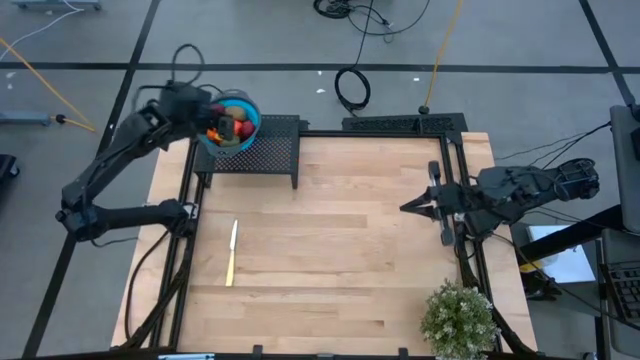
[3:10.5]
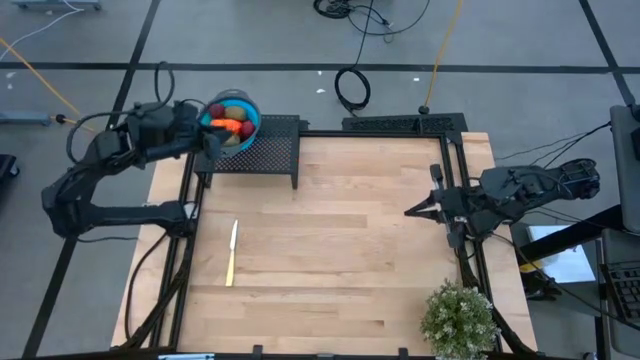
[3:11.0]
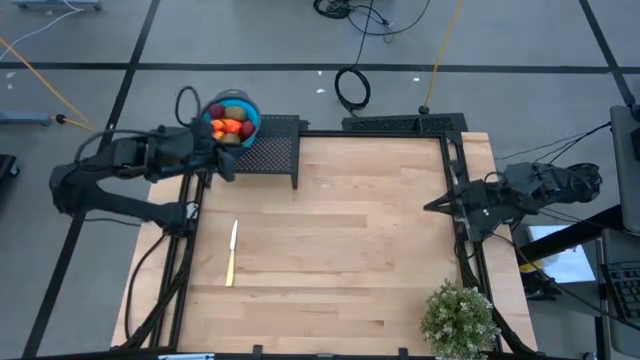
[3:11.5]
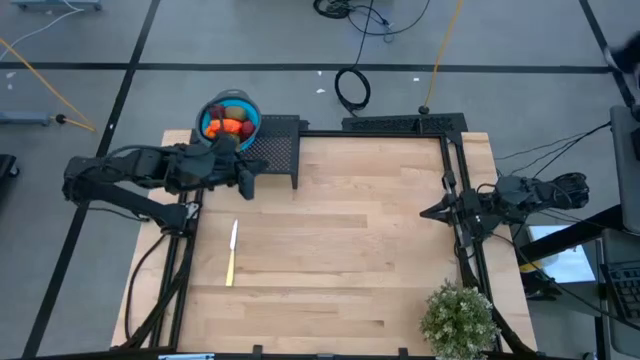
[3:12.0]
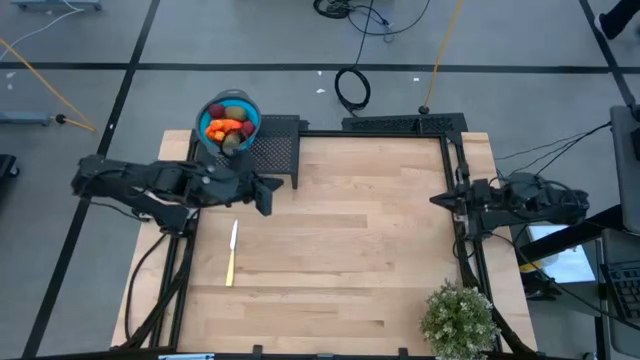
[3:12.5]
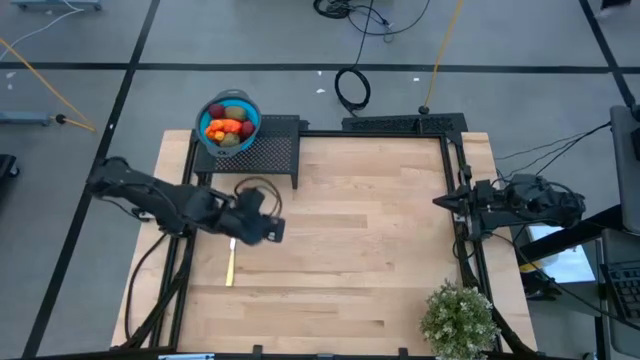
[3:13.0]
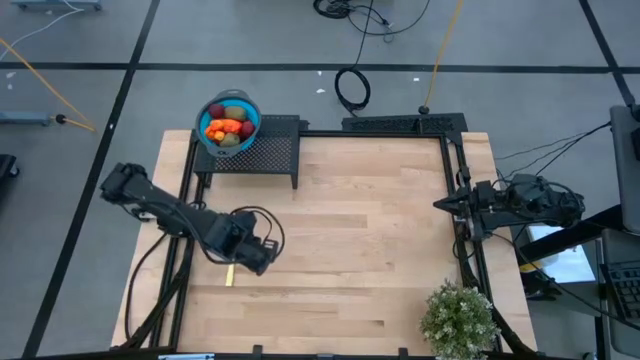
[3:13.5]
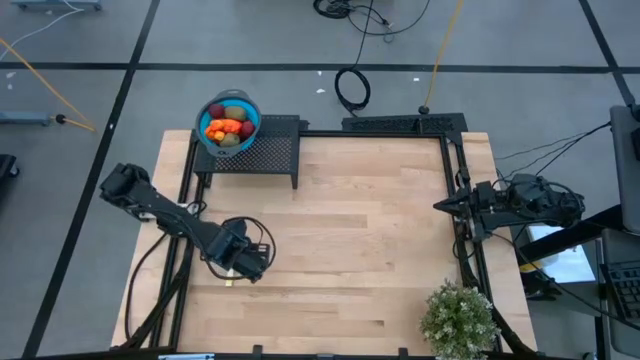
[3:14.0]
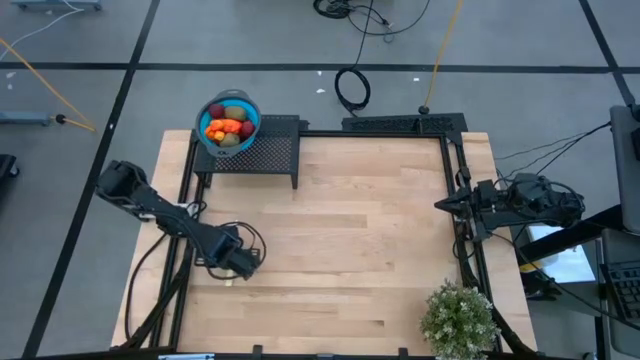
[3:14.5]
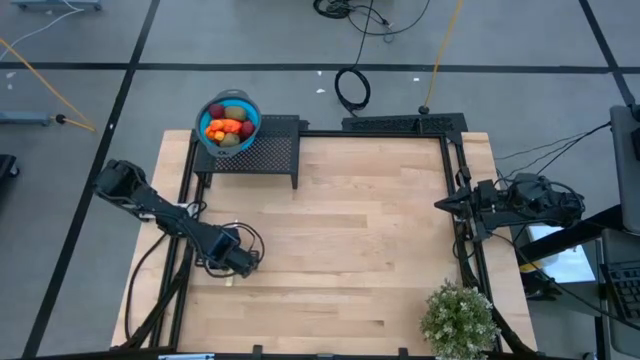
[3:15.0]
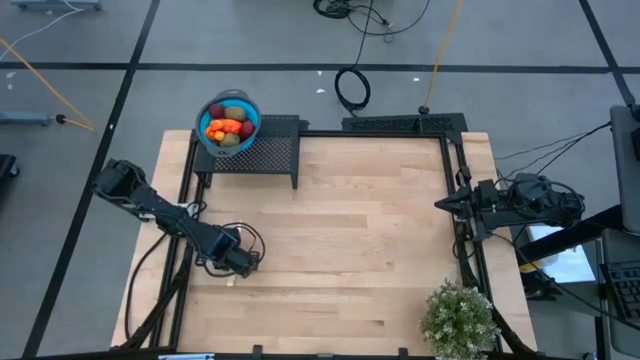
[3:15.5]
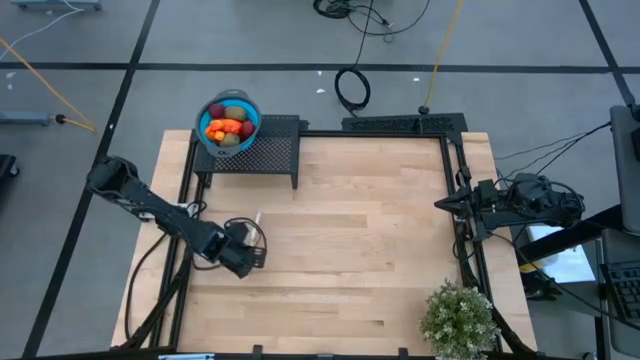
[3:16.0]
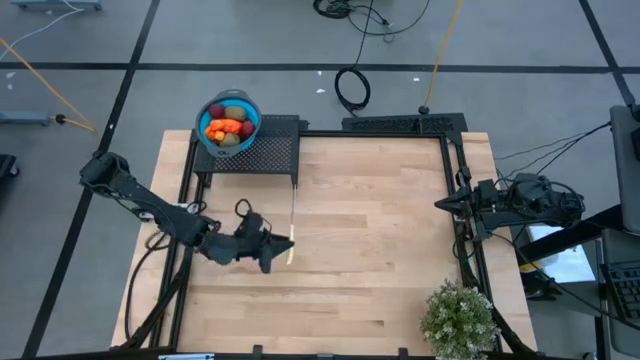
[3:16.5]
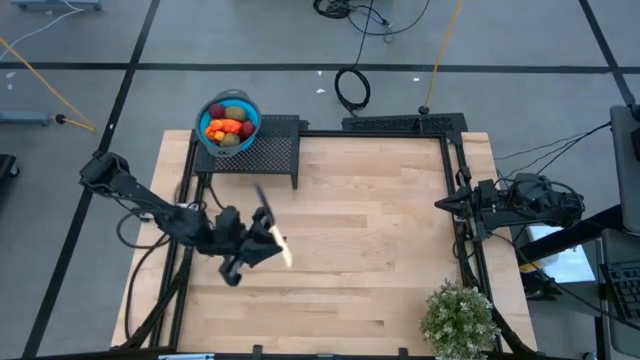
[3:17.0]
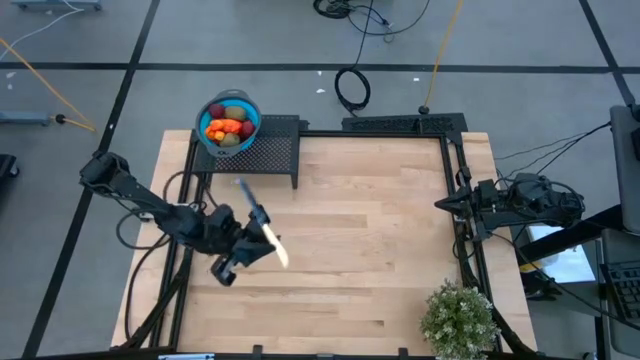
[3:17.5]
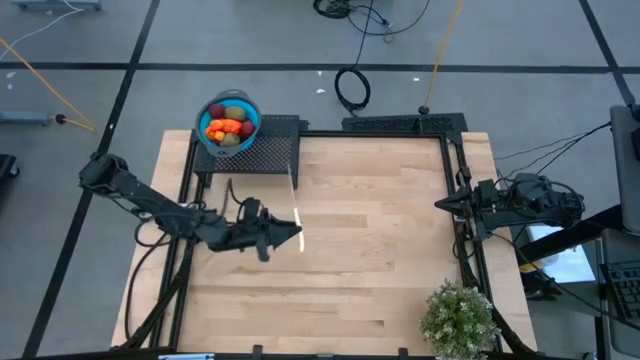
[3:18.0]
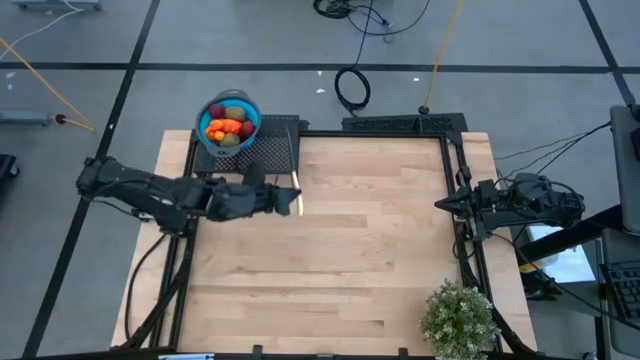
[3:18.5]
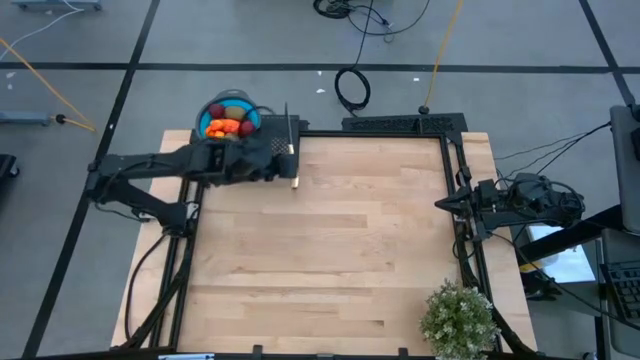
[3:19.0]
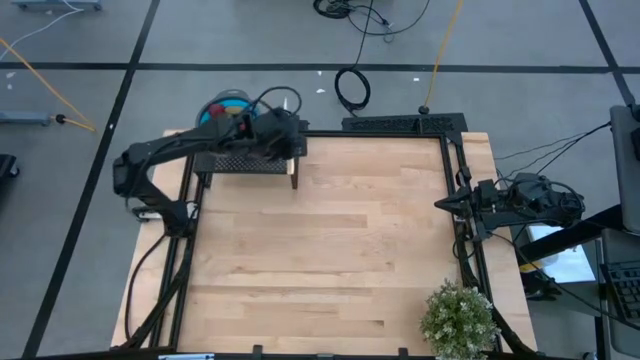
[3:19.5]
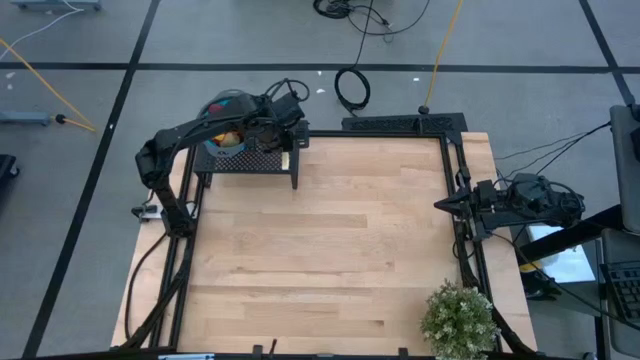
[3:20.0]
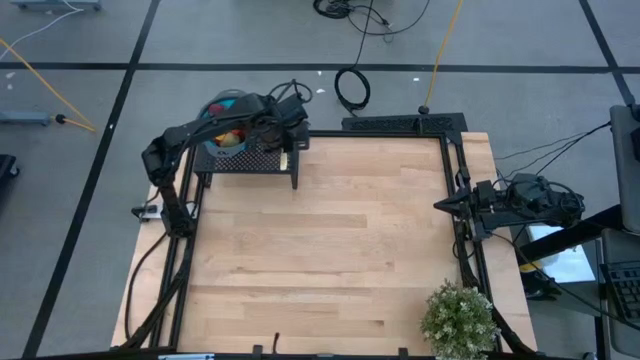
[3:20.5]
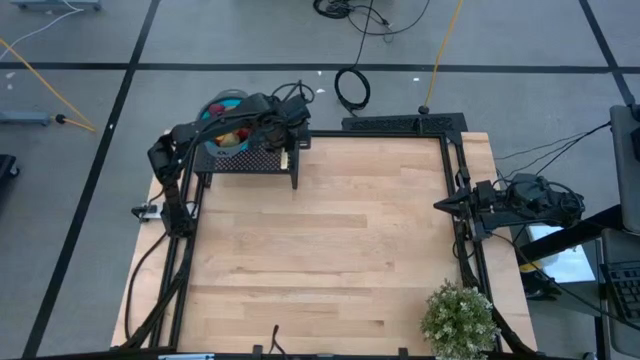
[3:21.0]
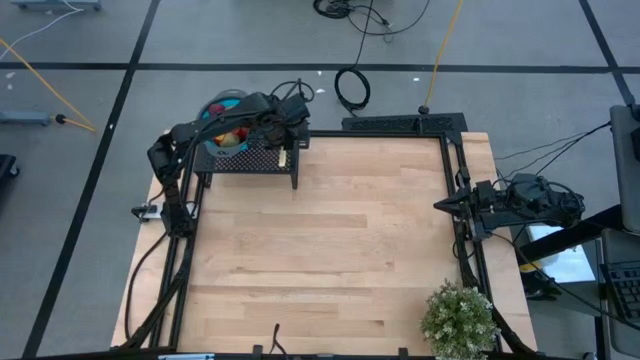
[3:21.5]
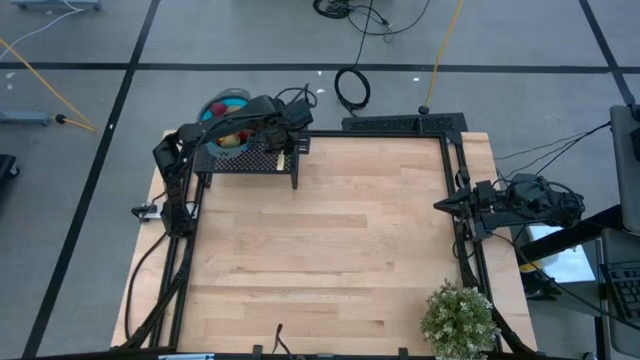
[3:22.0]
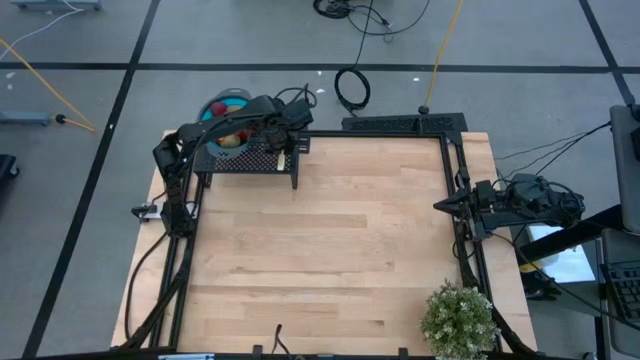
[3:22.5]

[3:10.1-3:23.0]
Task: Pick & Place Fruit
Put the yellow table knife on the shelf

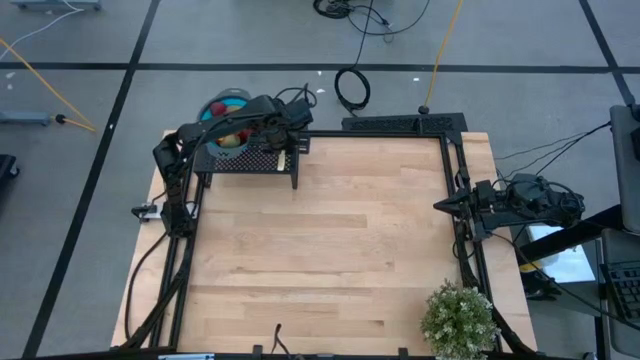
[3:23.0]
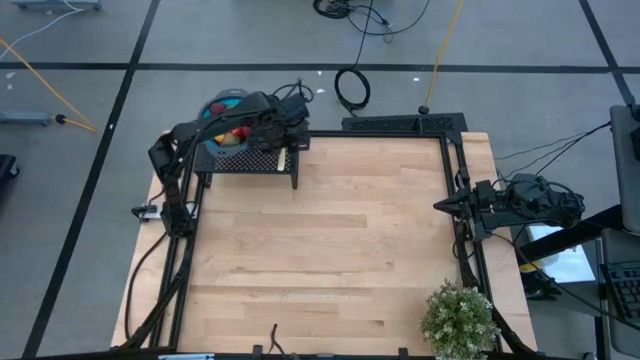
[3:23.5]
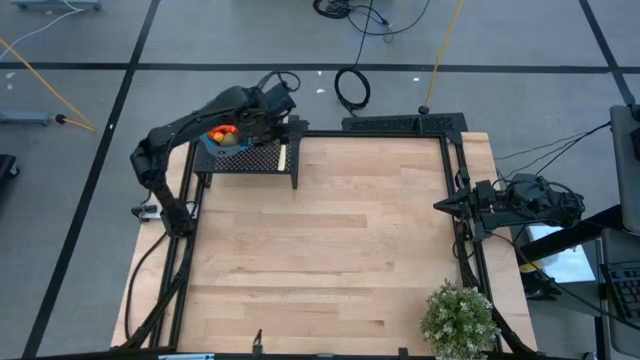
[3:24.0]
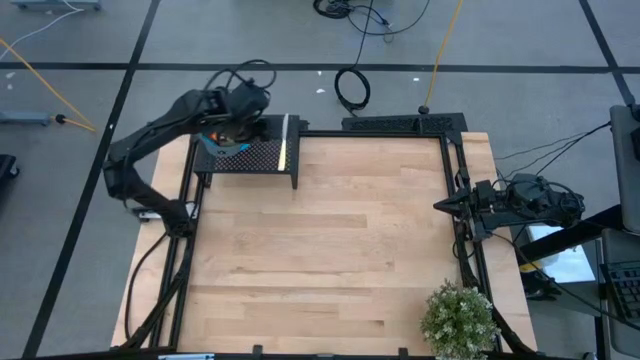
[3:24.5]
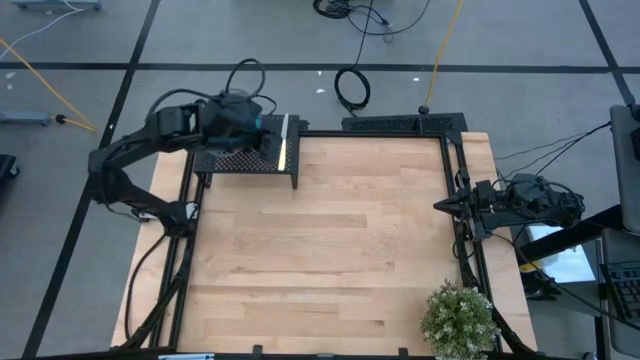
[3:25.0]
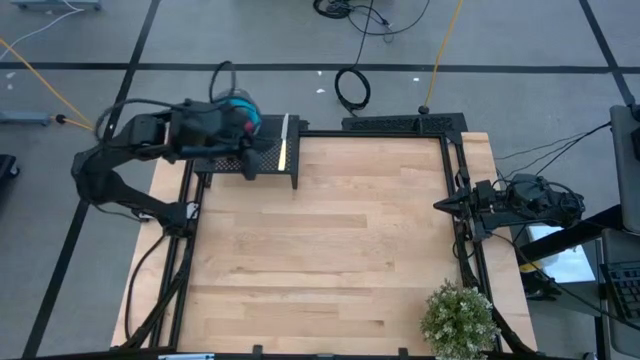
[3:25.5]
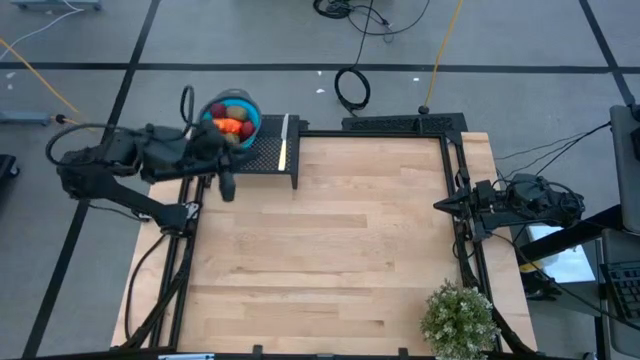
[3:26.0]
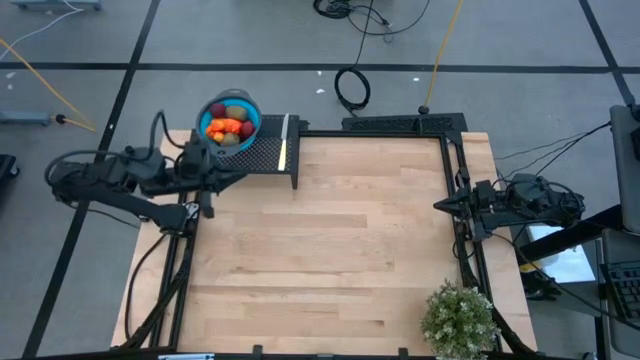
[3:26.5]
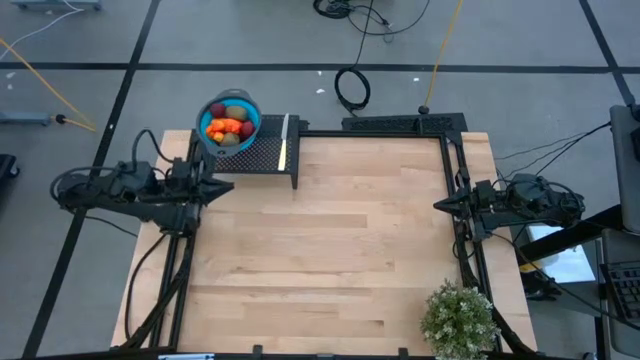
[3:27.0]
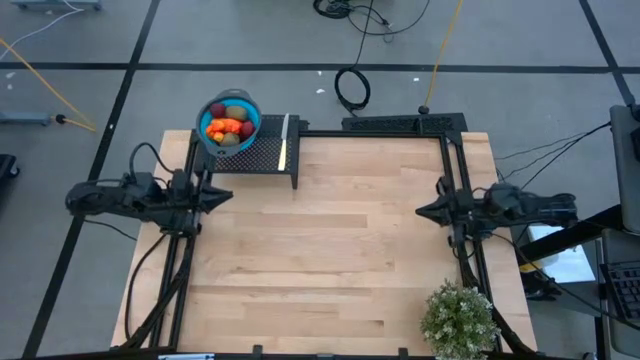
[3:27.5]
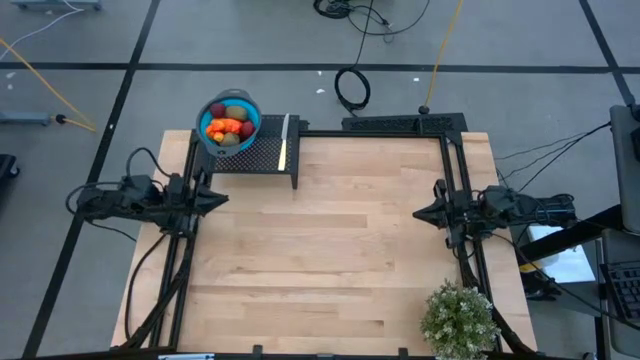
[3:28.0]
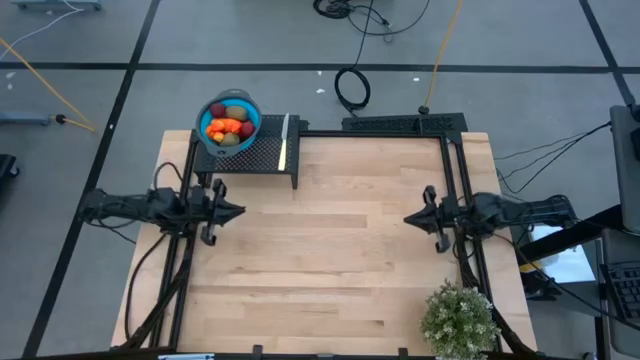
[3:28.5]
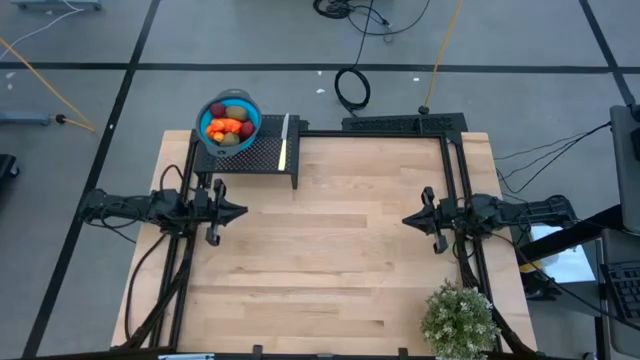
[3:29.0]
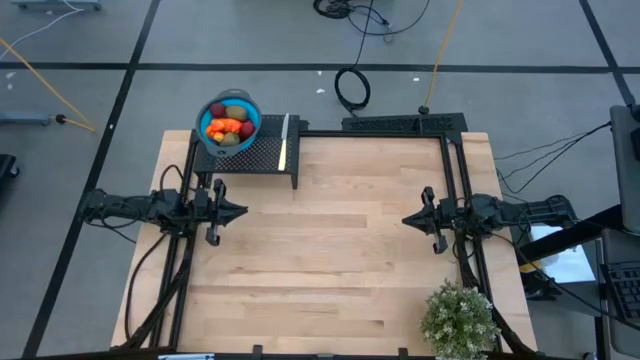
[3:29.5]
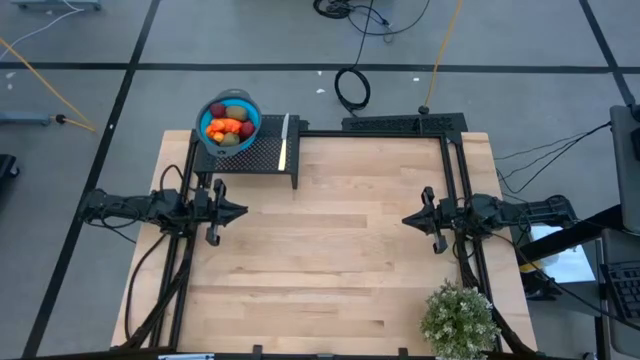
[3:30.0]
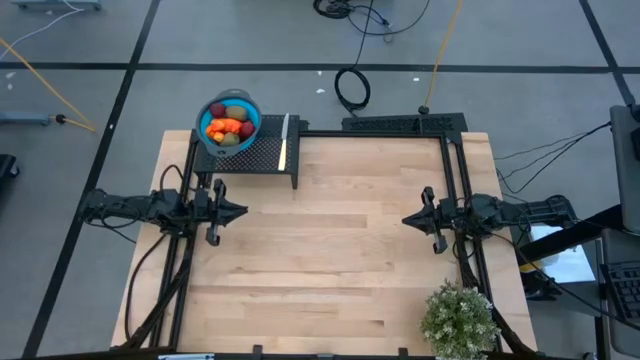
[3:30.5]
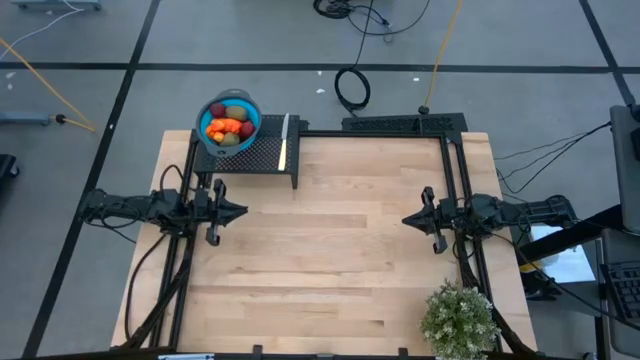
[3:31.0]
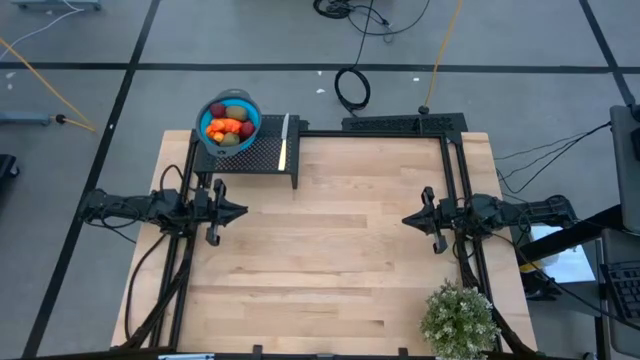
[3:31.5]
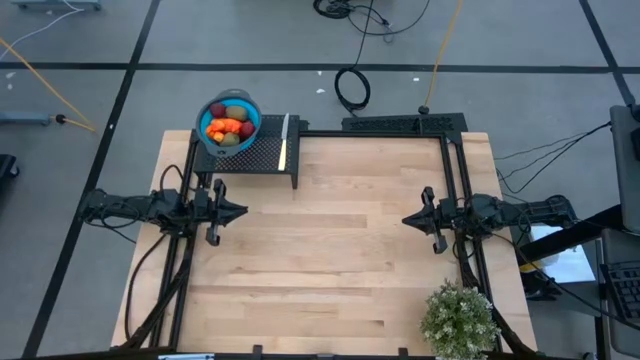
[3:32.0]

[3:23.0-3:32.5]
Return to Home Position
